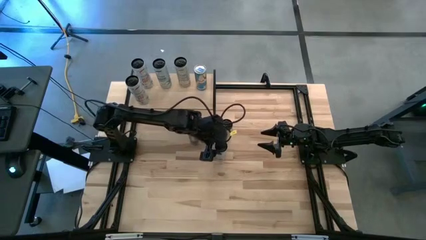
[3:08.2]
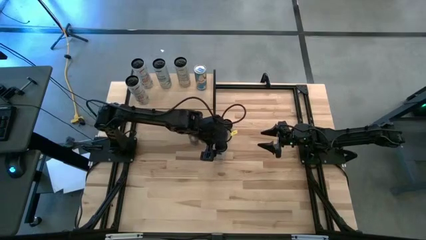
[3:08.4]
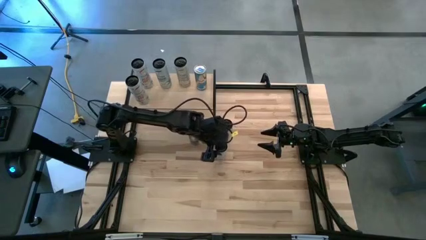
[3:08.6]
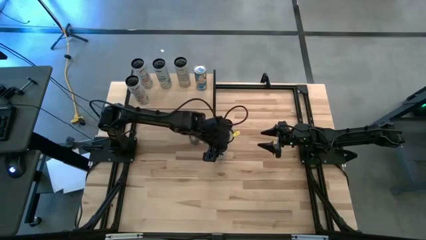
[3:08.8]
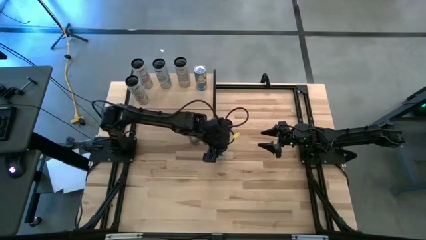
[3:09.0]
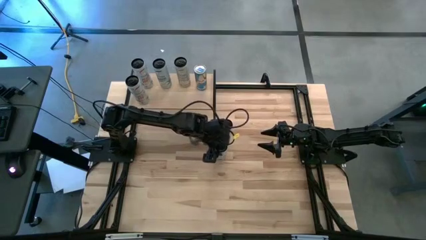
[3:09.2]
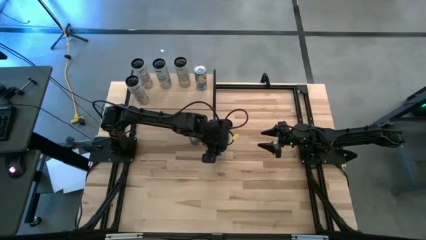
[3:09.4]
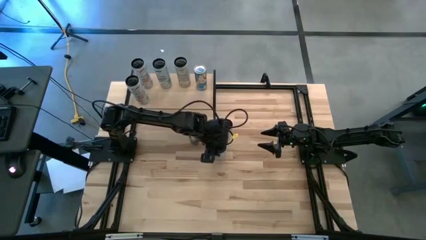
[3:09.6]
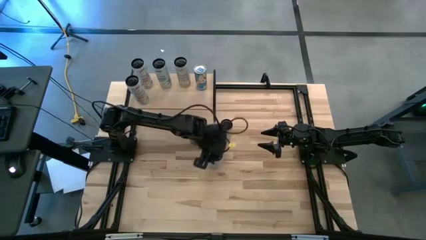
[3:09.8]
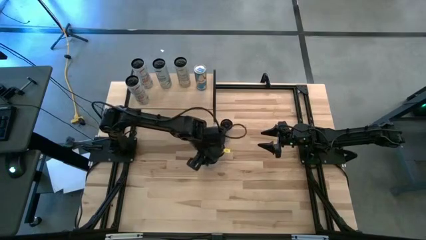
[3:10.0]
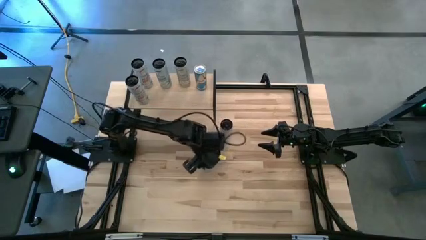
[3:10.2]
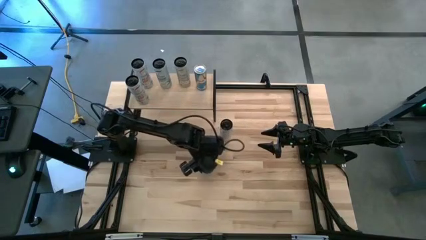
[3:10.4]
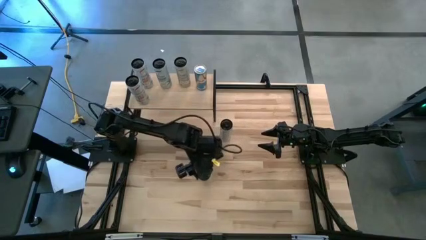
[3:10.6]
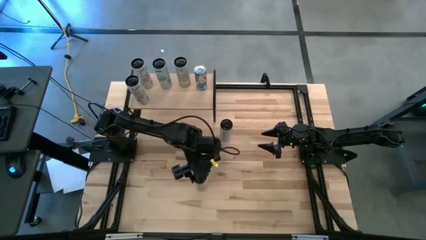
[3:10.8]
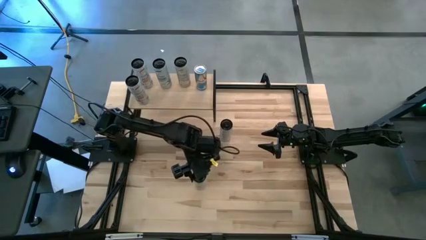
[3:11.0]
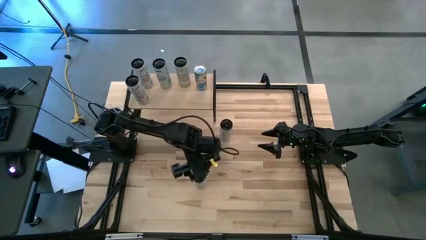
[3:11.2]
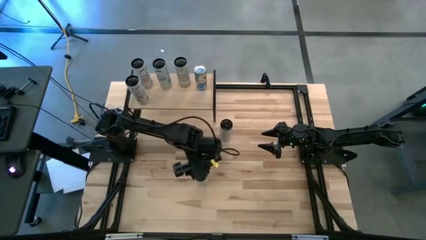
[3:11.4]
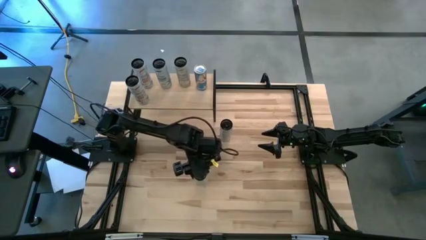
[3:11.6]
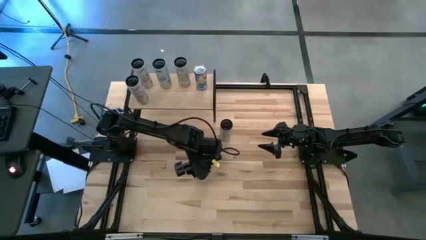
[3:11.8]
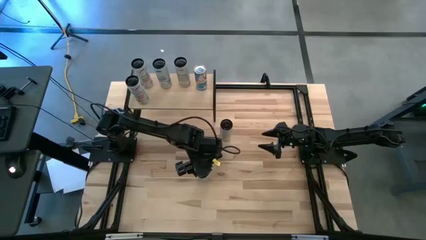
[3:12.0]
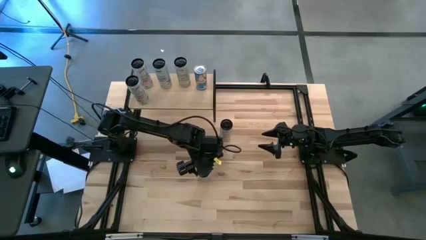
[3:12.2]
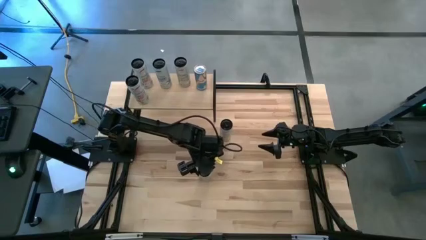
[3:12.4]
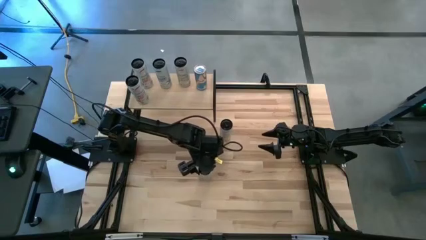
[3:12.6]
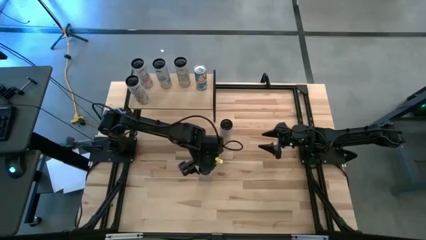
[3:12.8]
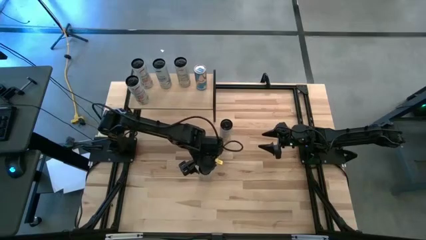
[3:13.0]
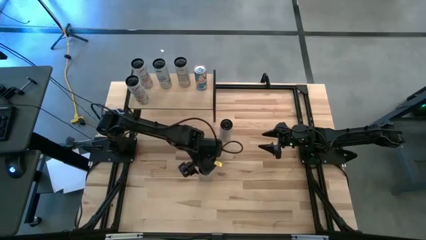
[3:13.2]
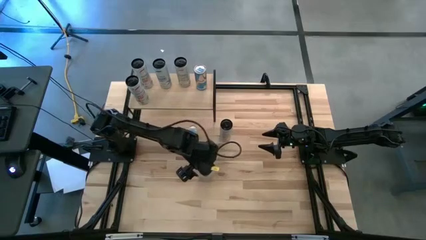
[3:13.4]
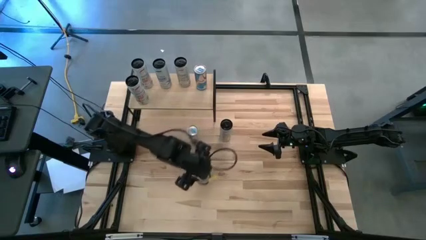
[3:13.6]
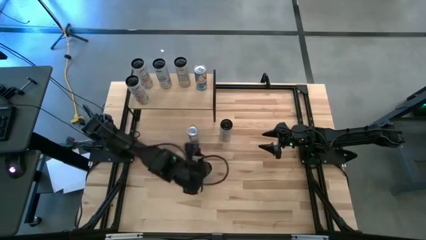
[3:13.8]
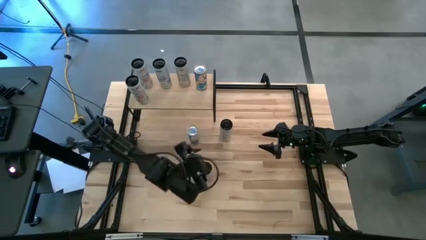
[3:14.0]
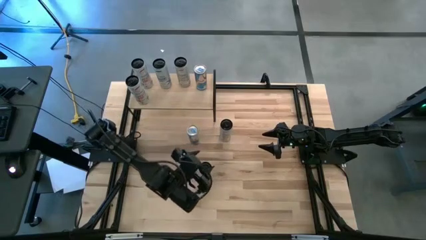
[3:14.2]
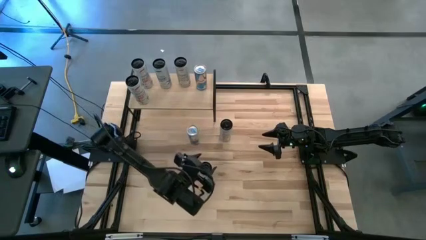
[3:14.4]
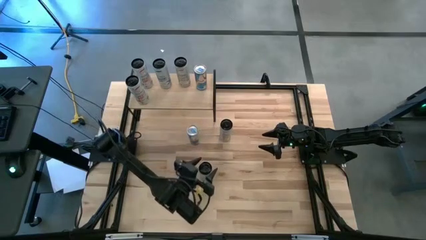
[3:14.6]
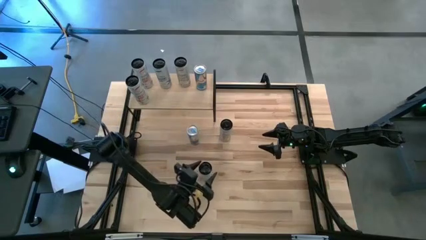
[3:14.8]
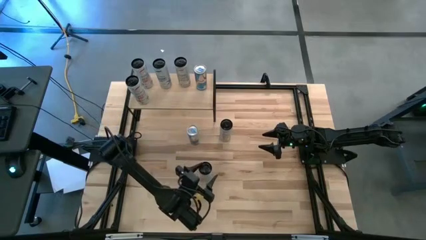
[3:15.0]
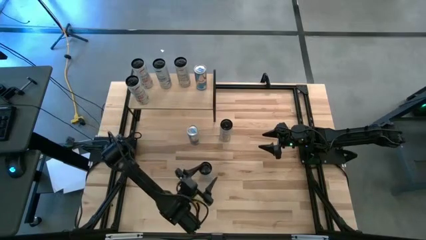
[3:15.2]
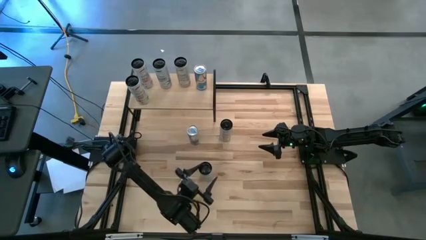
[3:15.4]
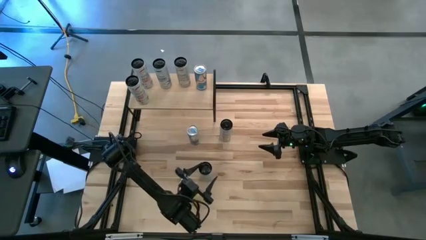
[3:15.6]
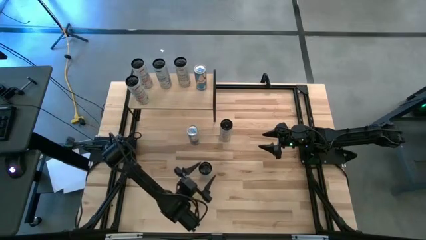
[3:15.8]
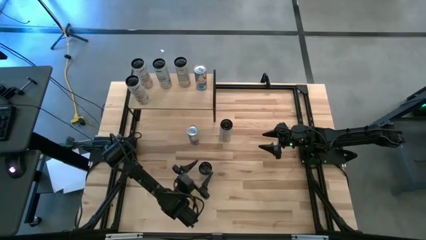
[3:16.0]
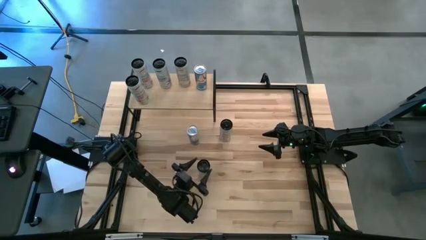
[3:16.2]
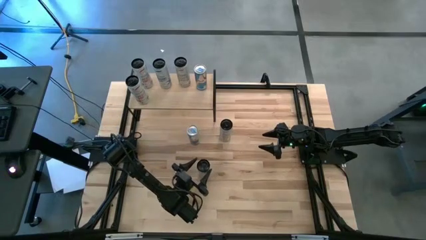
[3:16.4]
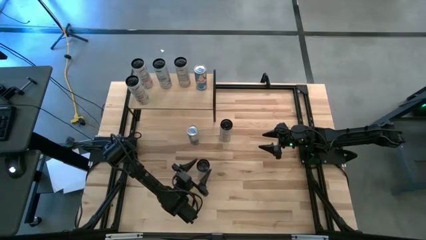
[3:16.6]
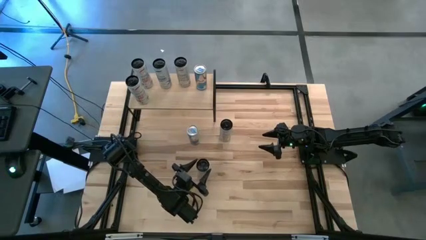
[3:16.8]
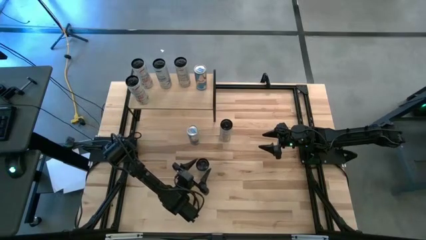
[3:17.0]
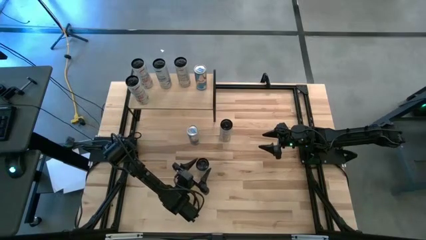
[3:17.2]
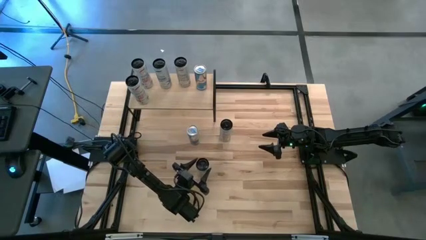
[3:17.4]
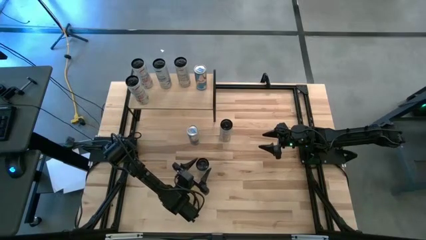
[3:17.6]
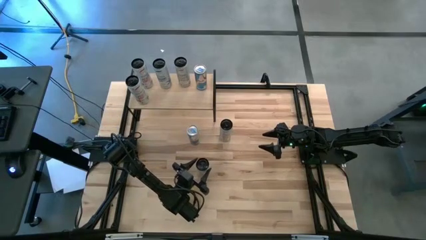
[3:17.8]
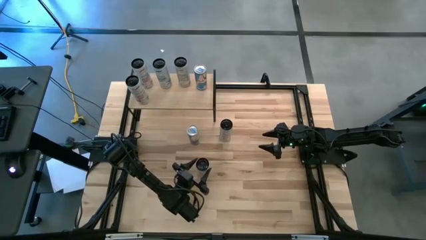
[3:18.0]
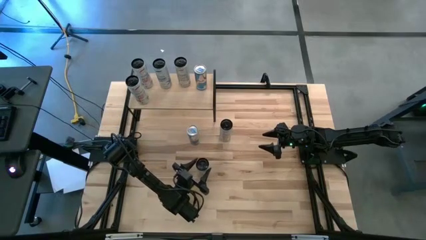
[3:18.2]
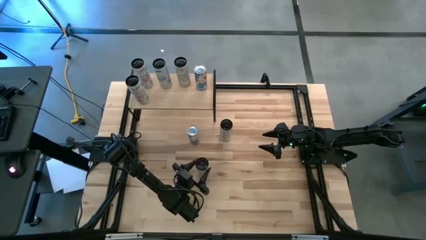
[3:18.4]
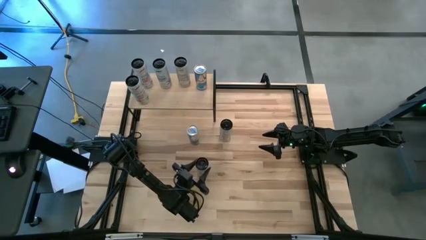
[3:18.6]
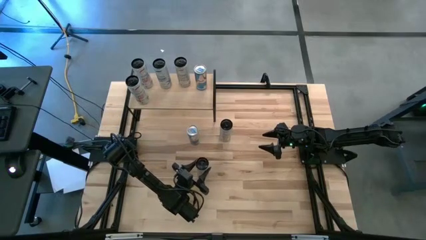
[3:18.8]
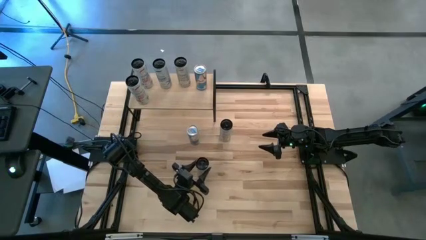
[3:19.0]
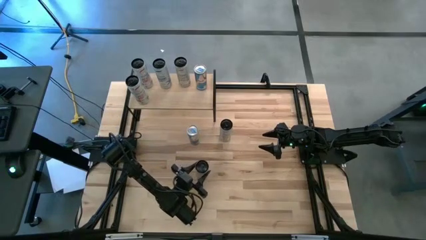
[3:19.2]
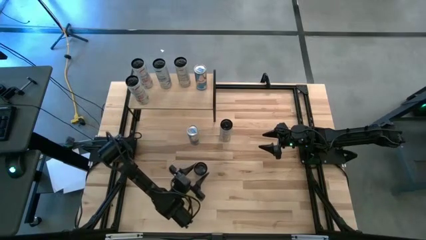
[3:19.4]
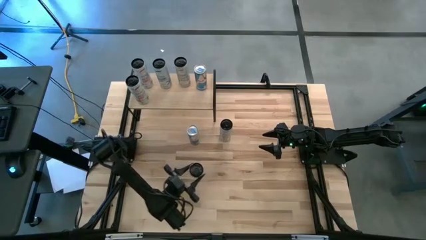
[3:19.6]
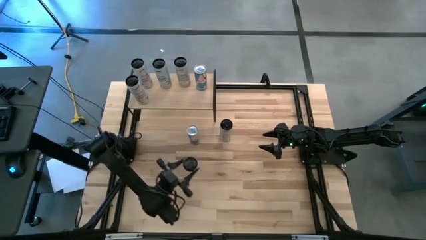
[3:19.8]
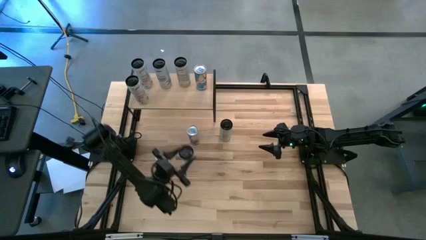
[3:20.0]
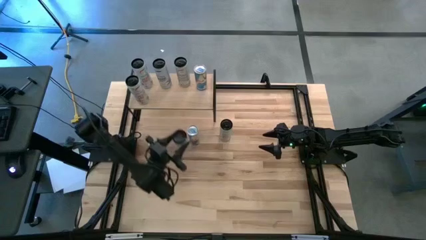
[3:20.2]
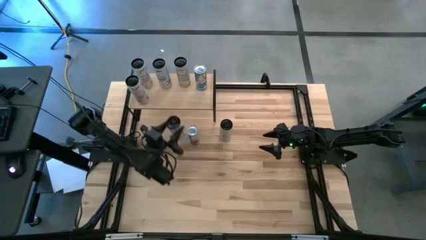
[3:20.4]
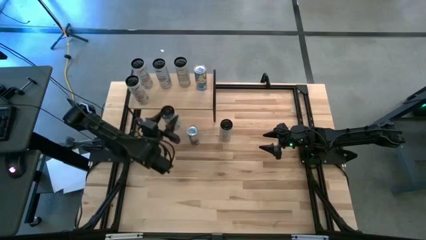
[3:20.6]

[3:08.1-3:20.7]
Task: Place canned beverage on shelf
Put the white blue soda can on the shelf aligned with the other white blue soda can
